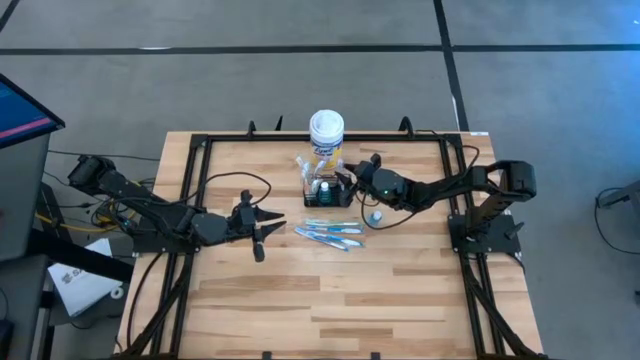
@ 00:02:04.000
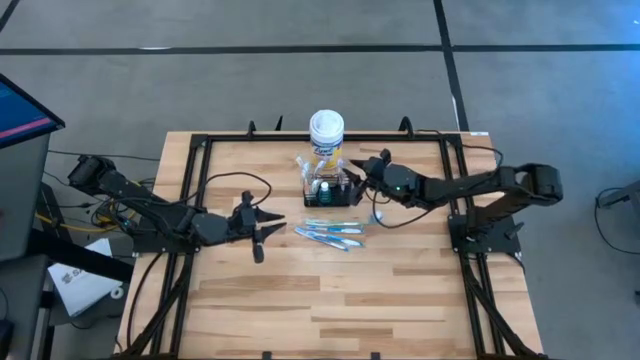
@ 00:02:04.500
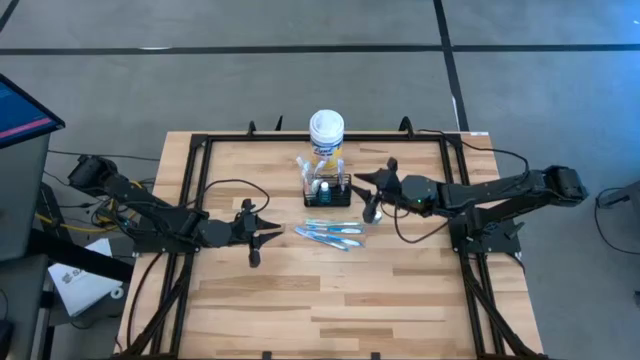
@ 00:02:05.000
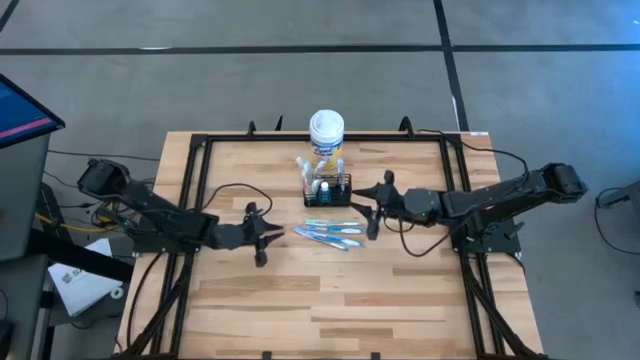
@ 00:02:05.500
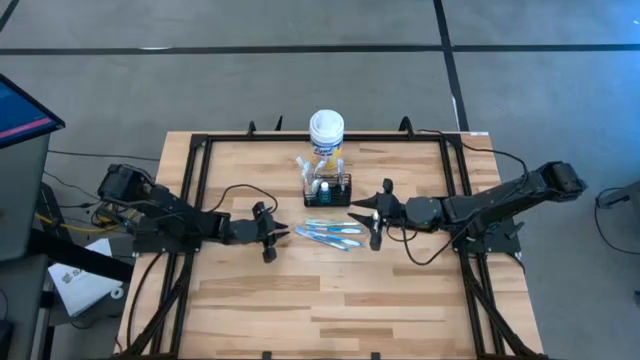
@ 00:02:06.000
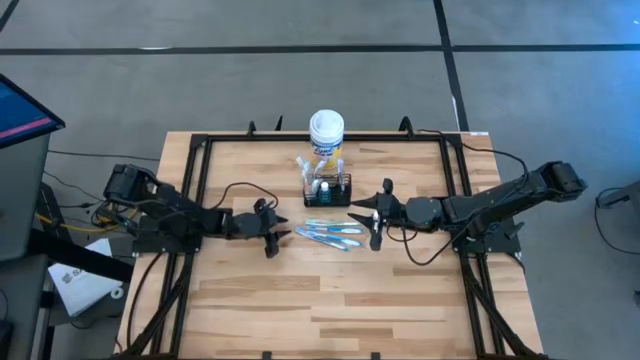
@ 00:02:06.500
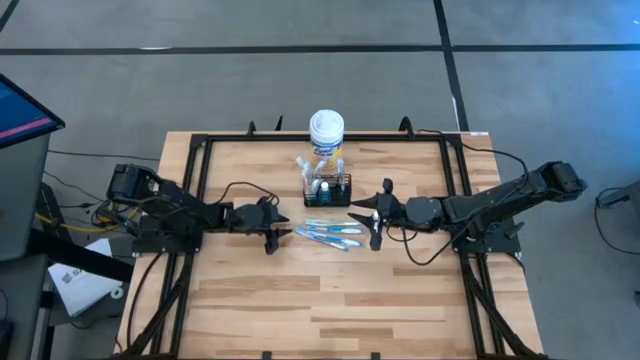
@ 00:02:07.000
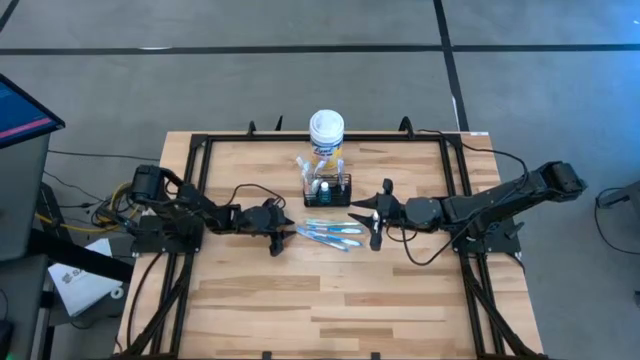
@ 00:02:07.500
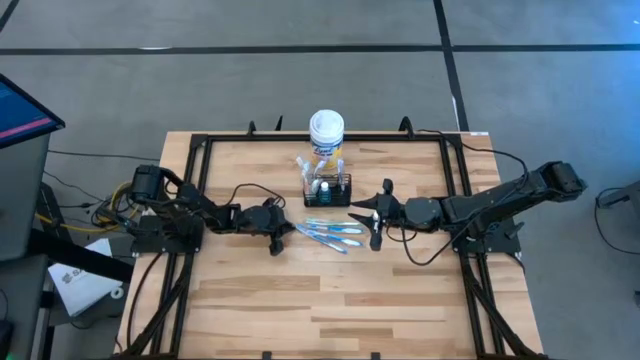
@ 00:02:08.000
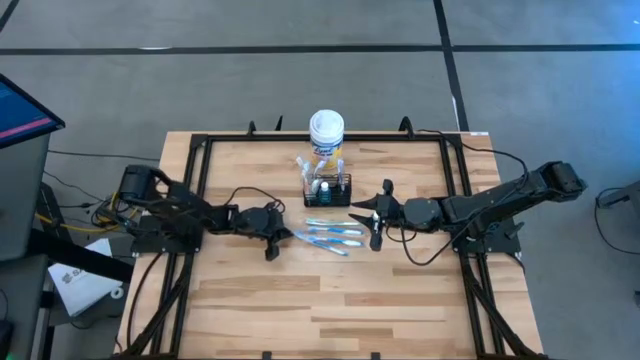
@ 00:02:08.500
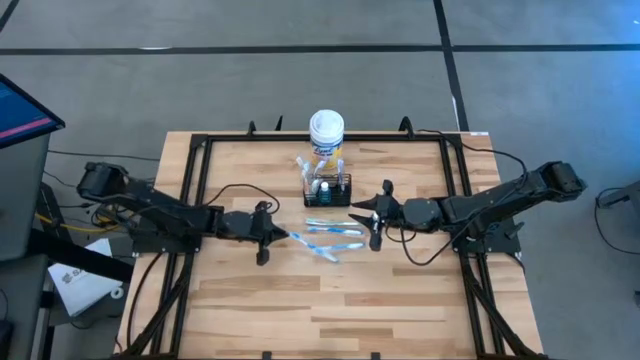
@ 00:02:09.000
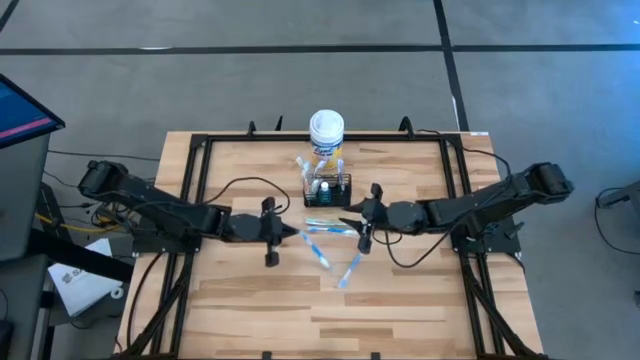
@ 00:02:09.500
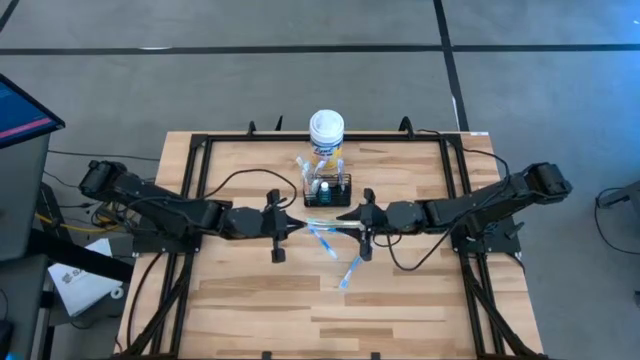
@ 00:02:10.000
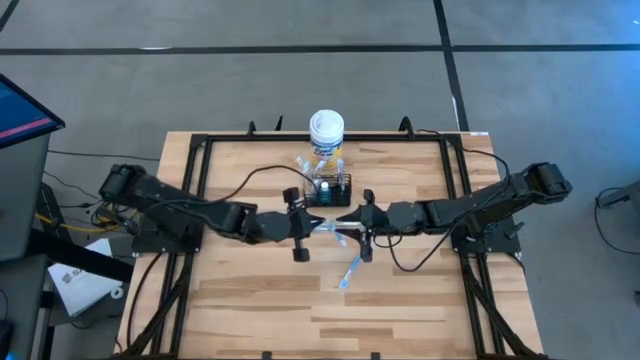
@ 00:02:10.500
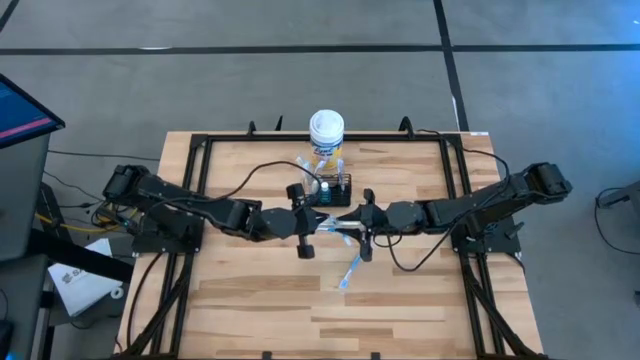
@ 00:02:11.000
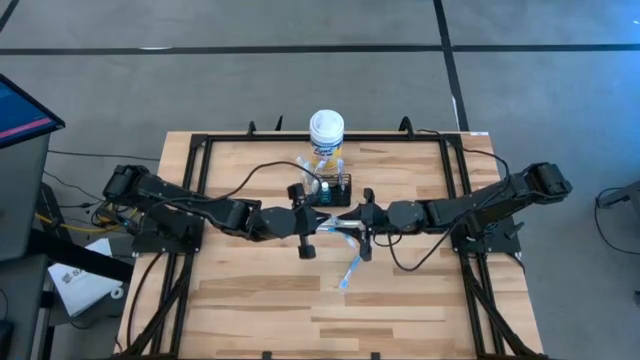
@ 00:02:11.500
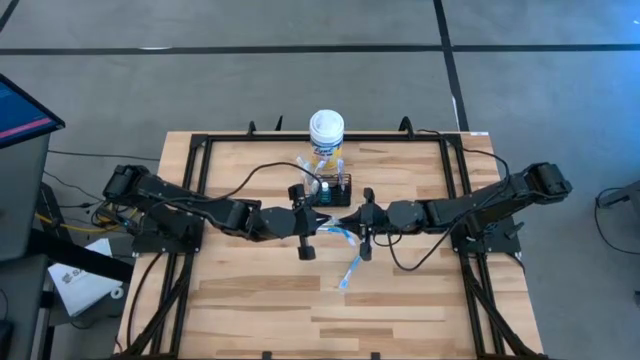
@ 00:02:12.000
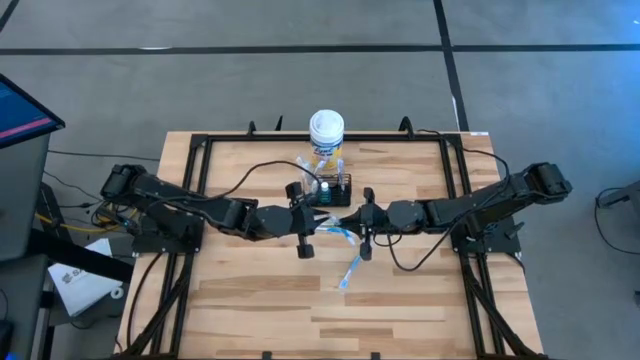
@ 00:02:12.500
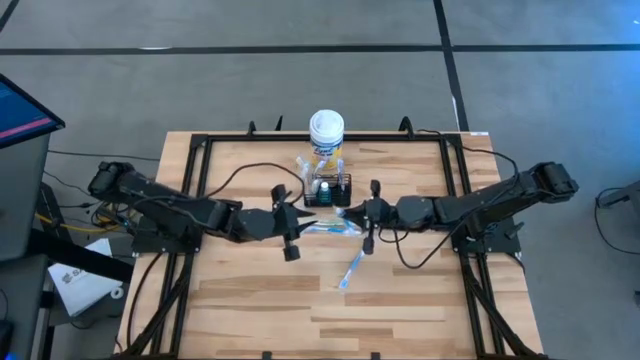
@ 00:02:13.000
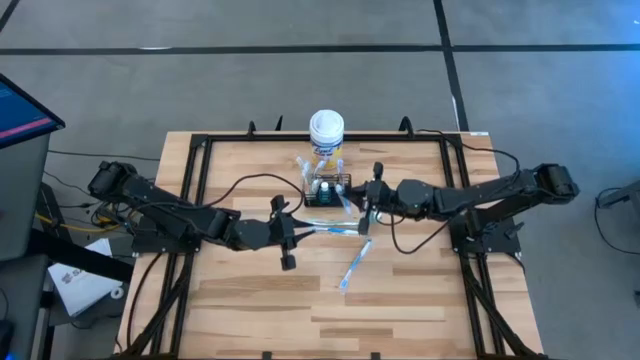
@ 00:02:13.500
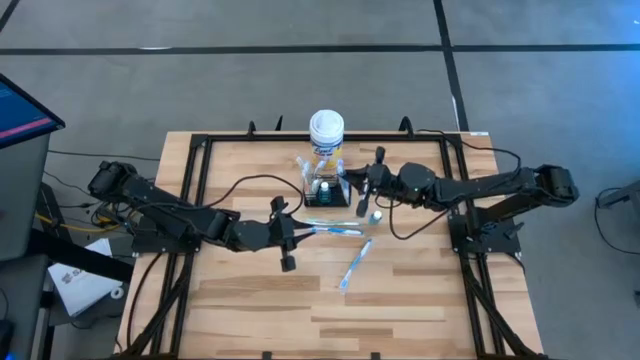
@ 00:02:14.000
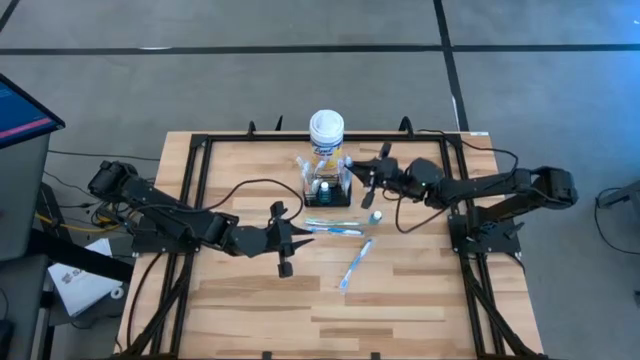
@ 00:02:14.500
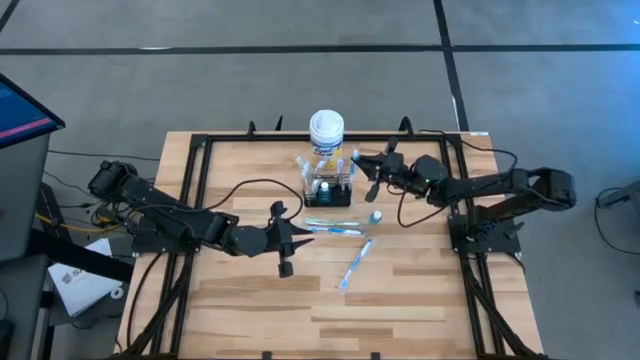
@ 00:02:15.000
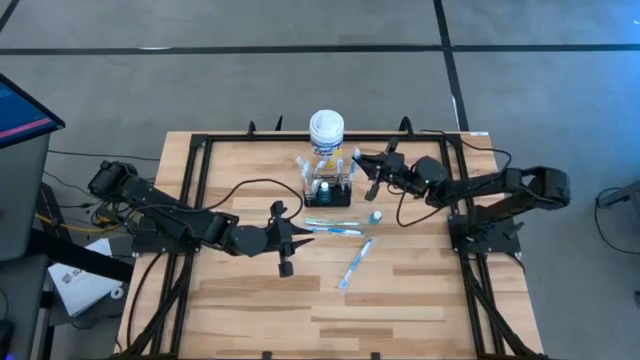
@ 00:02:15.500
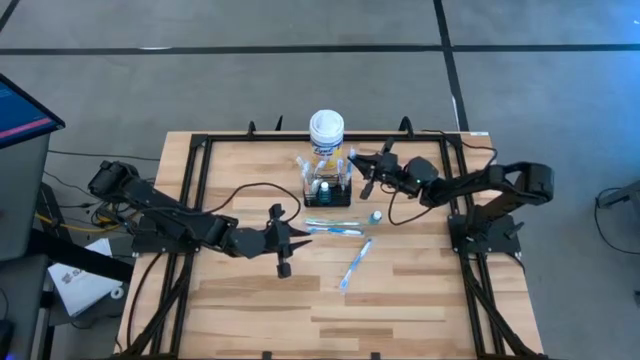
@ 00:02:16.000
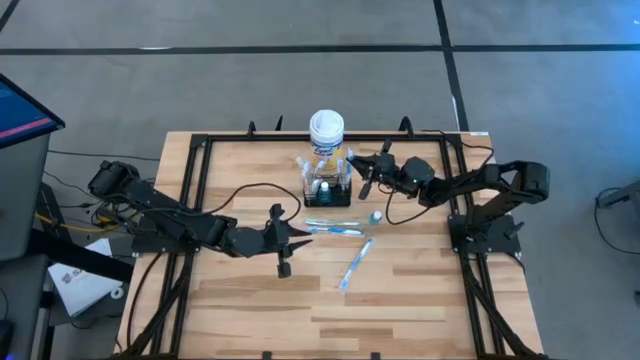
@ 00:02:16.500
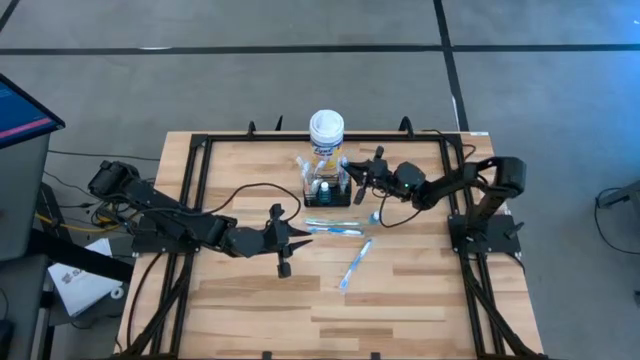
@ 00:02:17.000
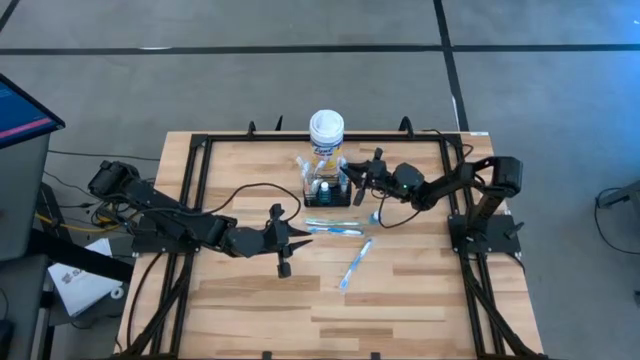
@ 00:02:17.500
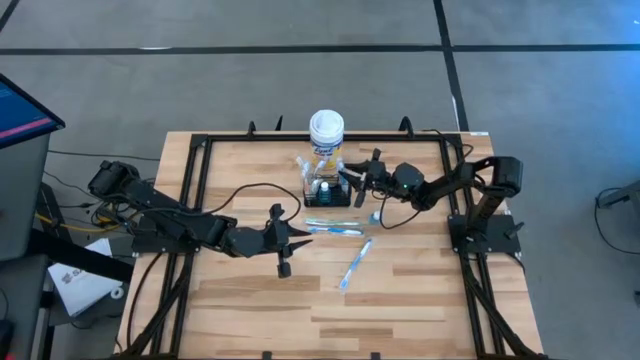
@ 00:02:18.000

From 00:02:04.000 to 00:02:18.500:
Task: Pick & Place toothbrushing station
Put the blue toothbrush into the black wire organizer

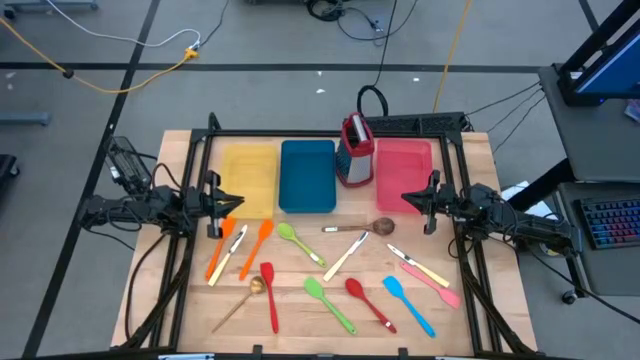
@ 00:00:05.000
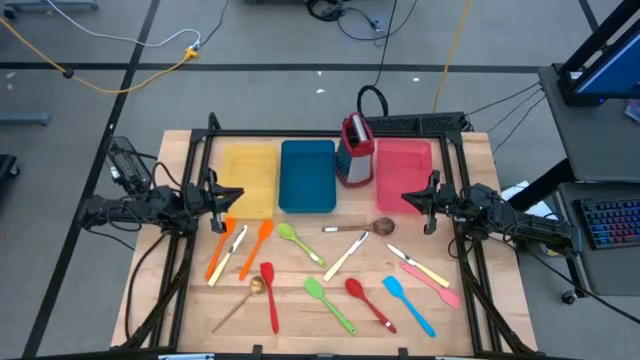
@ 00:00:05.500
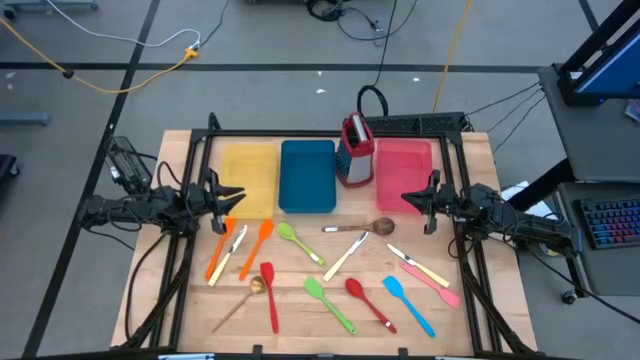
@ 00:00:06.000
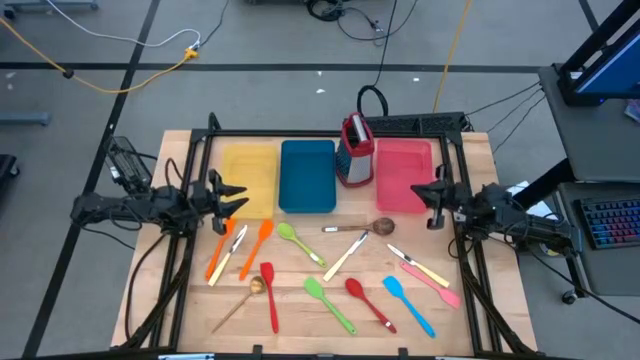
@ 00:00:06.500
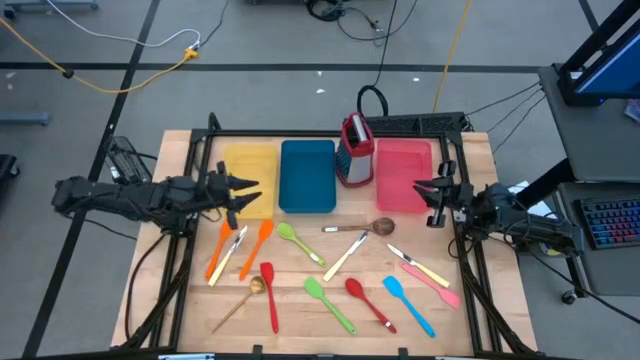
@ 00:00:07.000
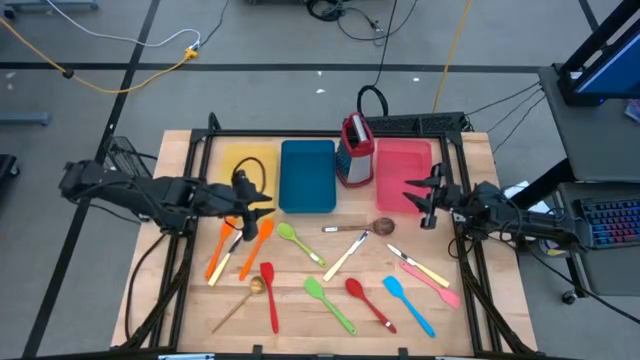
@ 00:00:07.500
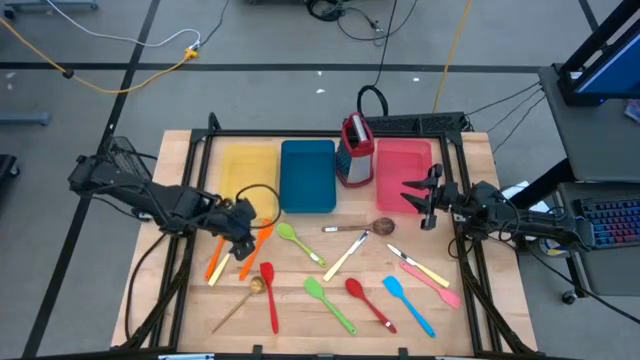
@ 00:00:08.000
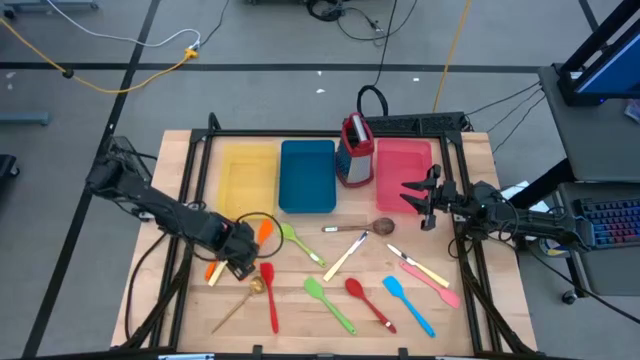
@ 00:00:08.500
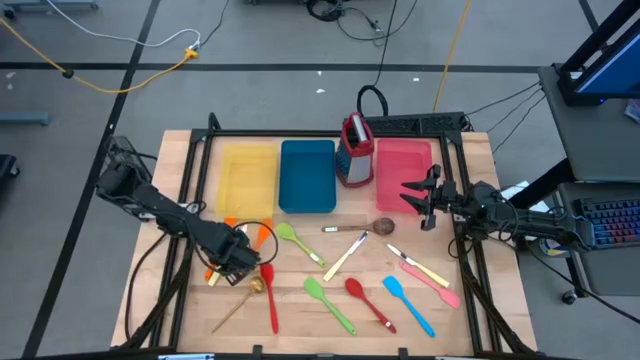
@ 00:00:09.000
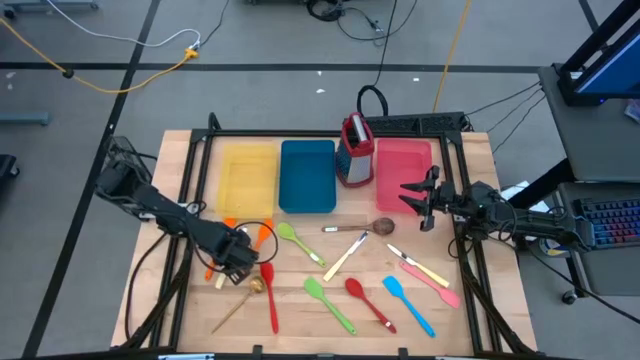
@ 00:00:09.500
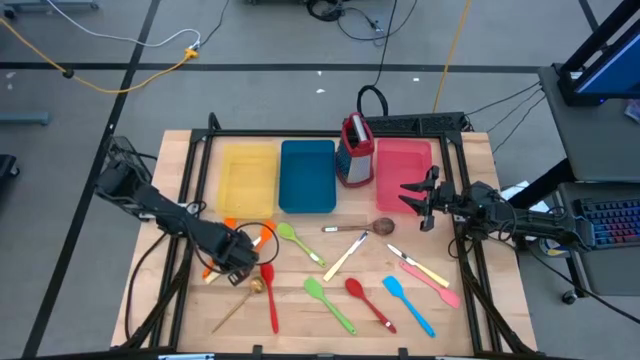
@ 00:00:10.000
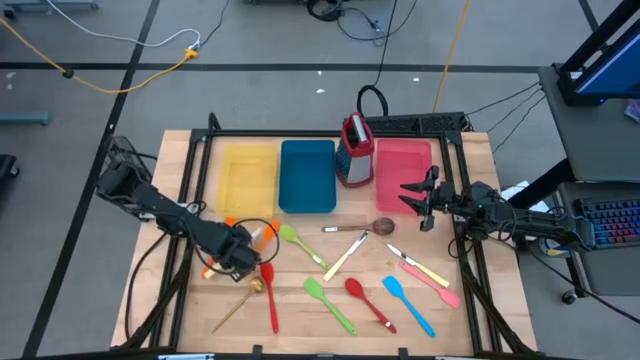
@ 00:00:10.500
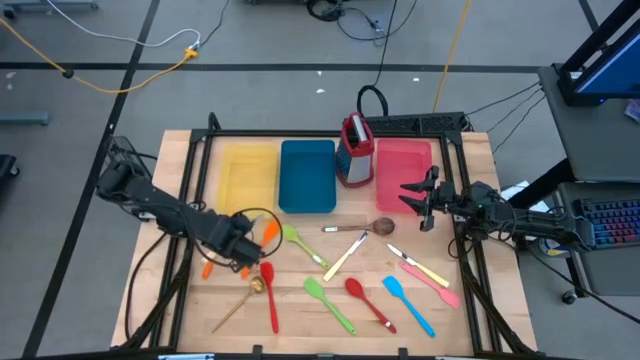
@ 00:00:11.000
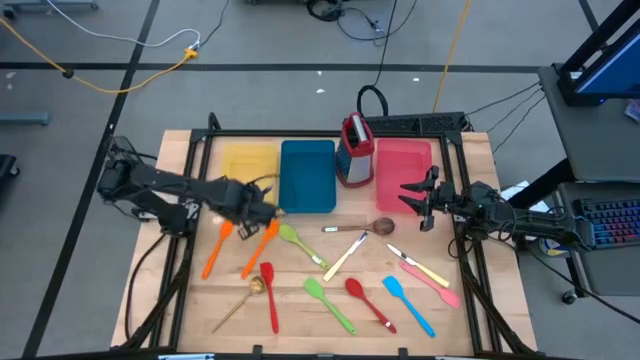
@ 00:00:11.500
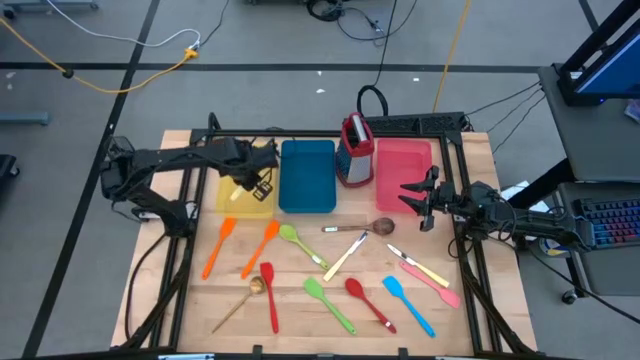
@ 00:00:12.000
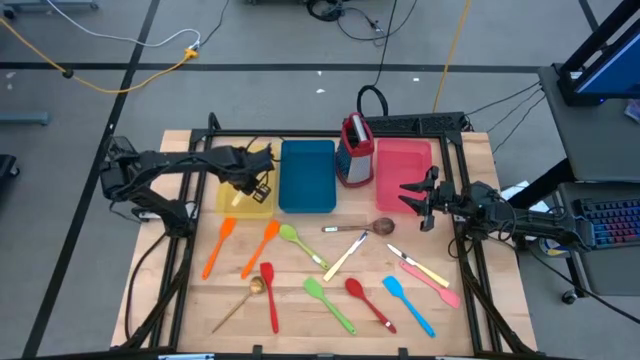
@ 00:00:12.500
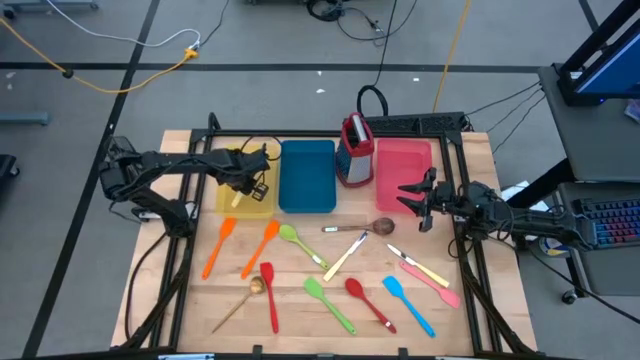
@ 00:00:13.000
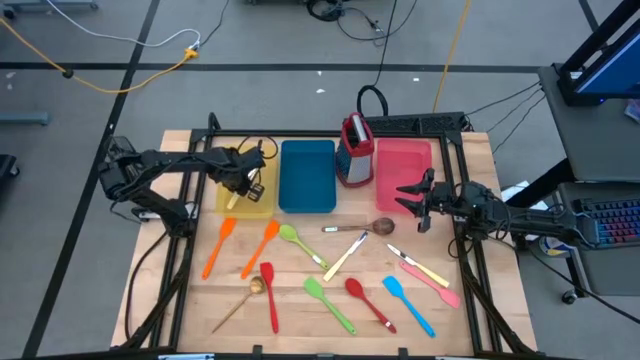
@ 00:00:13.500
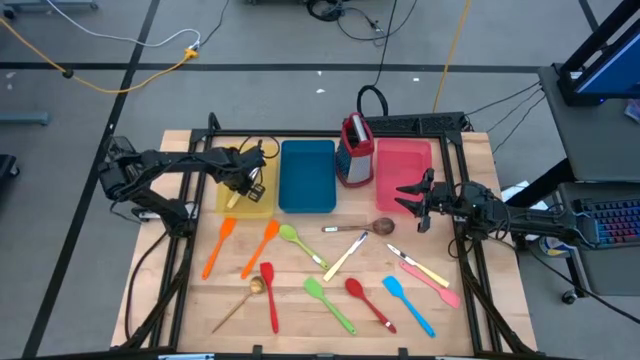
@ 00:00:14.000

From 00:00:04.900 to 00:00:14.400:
Task: Pick & Place Kitchen Items
Put the left yellow table knife into the yellow bin
